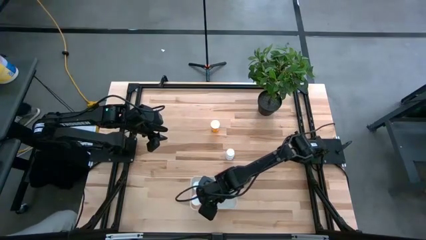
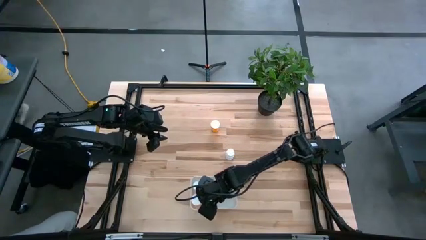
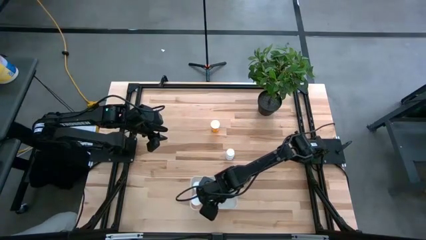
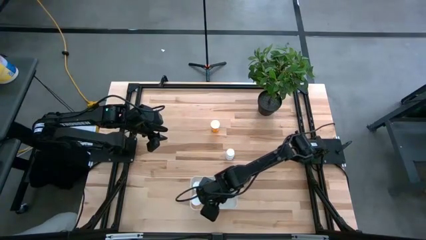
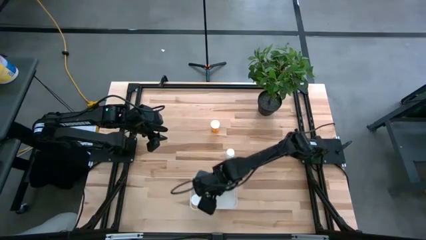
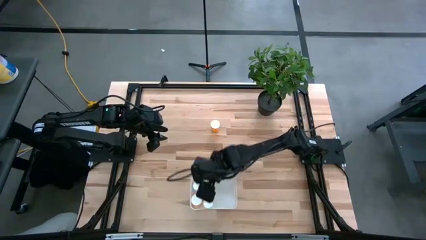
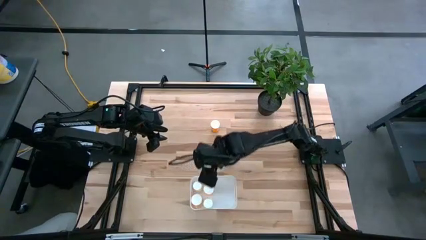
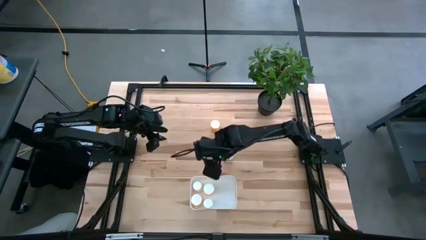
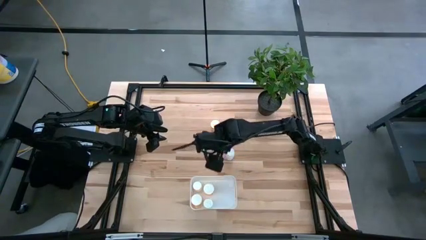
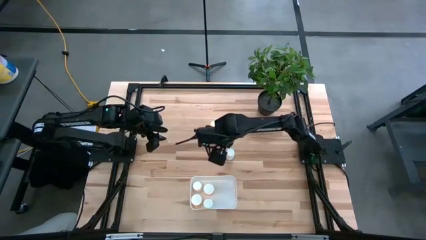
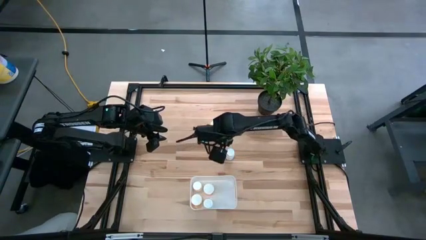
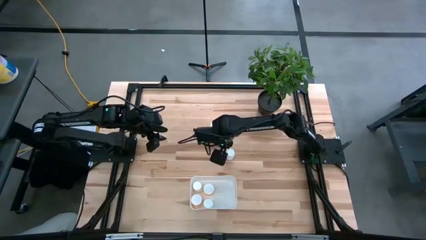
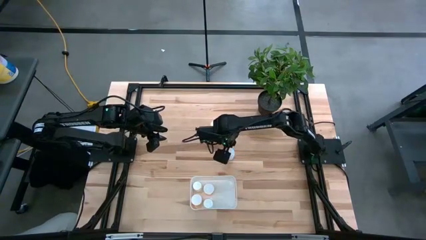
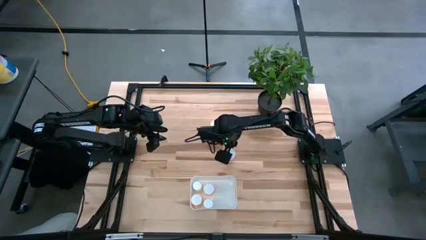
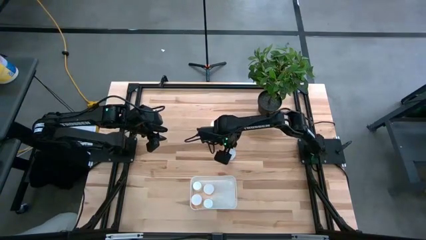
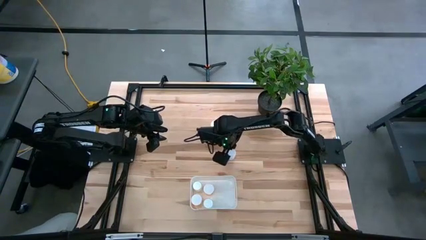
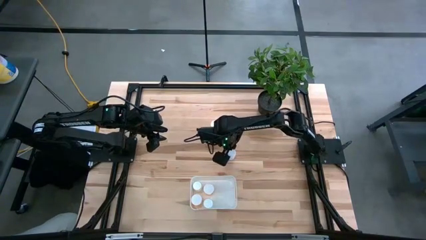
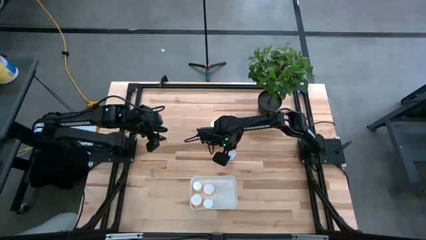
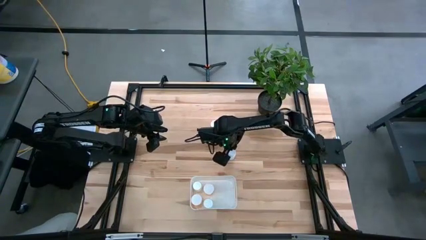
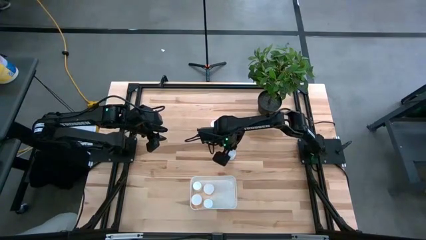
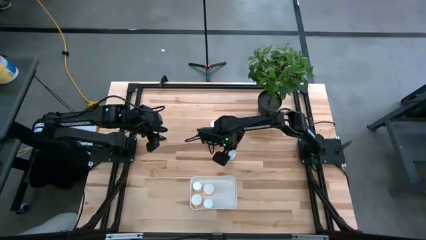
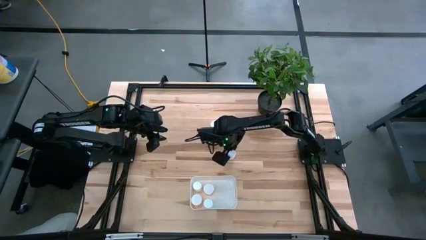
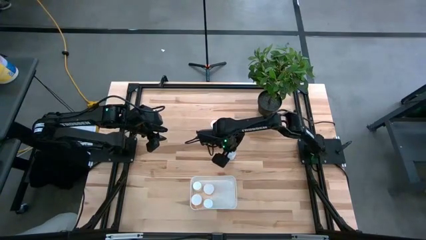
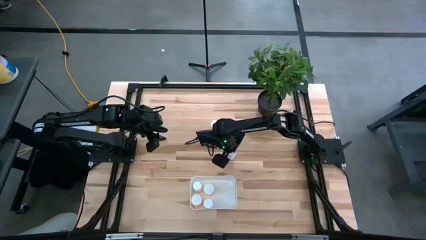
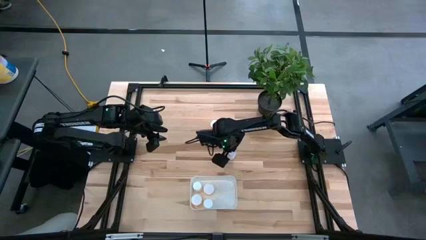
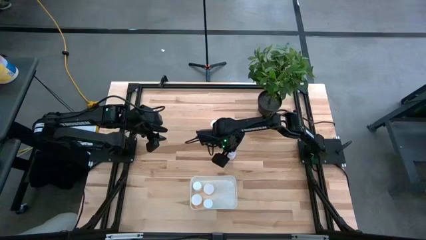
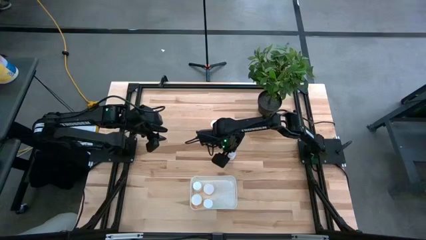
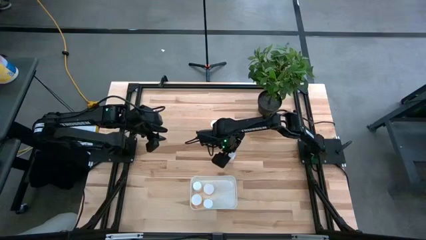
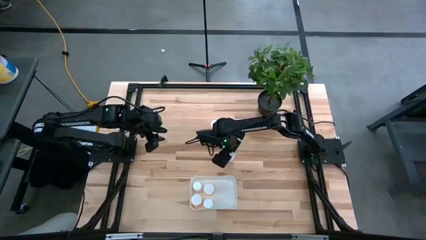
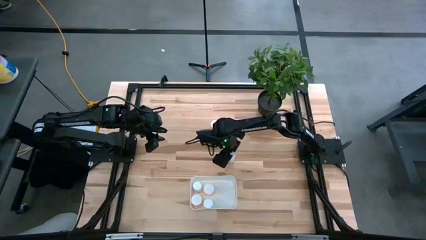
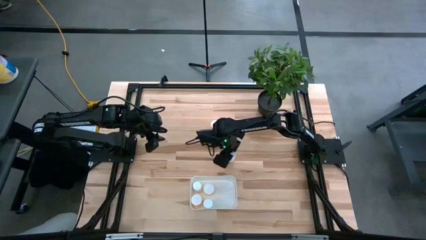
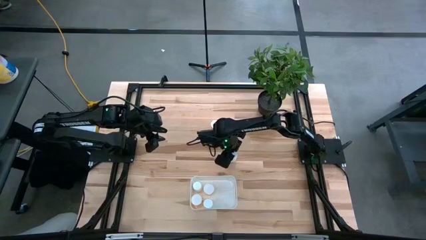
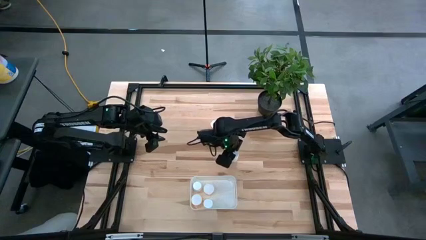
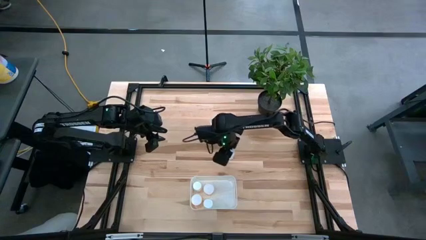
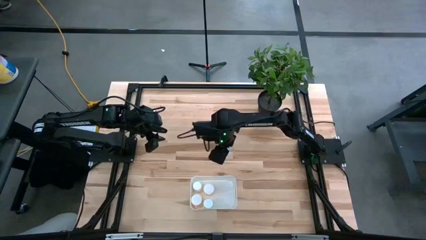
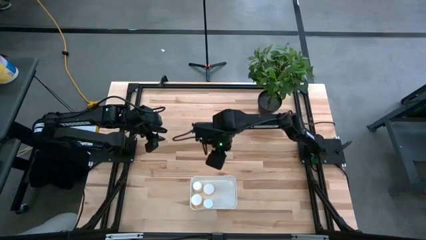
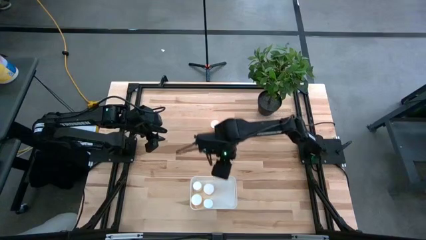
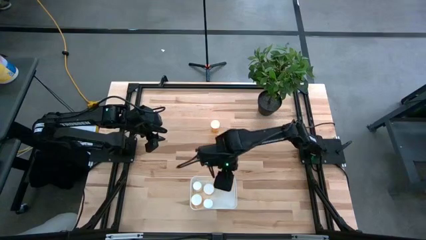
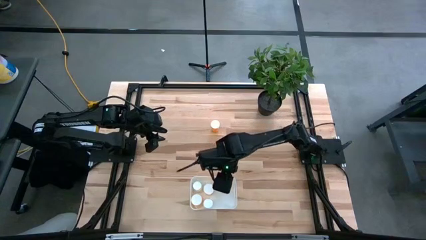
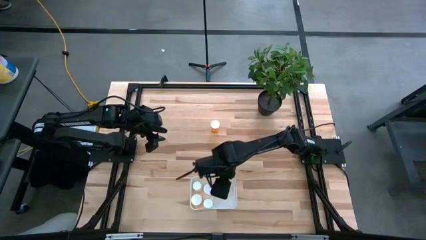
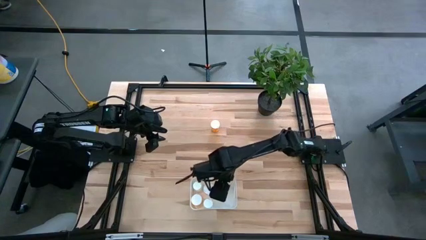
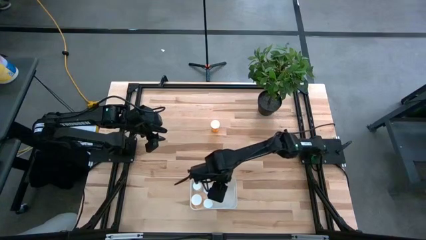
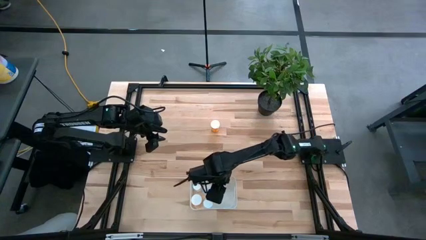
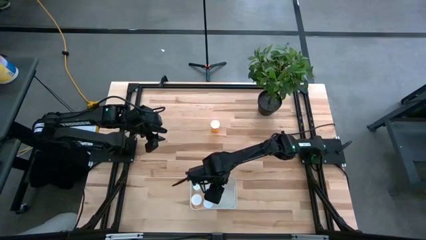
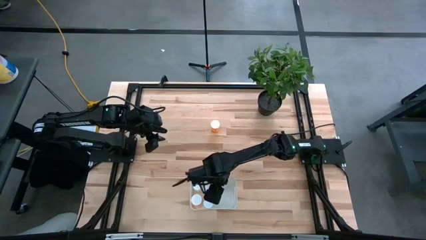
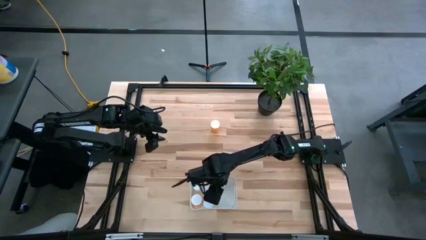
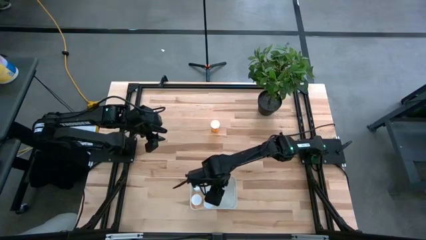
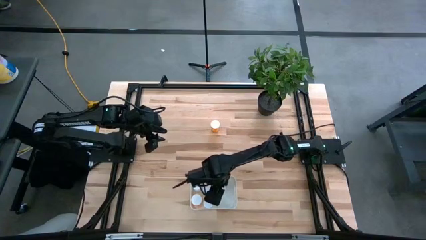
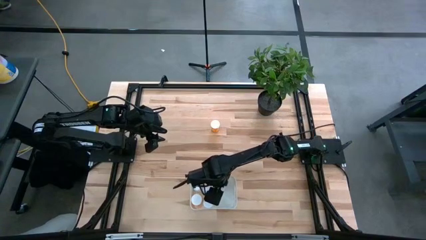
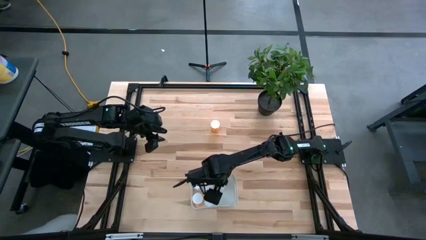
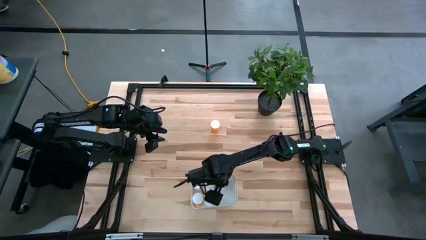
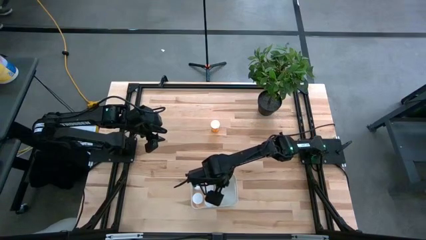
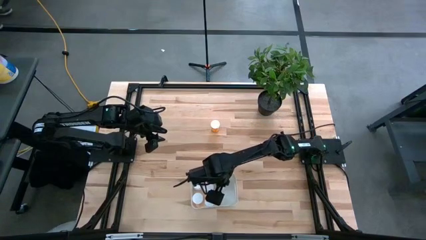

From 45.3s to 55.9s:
Task: Pick and place pill bottles into a basket
Put the white pill bottle in the white bin
